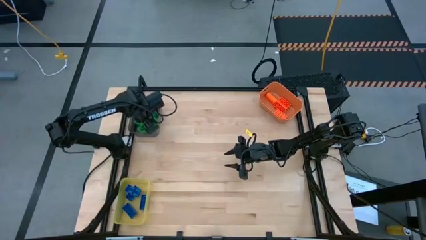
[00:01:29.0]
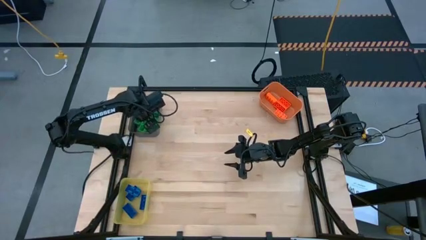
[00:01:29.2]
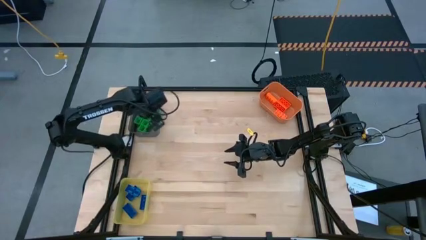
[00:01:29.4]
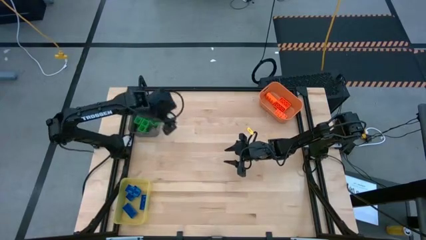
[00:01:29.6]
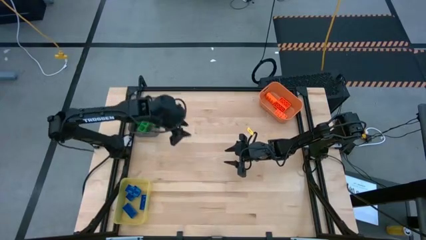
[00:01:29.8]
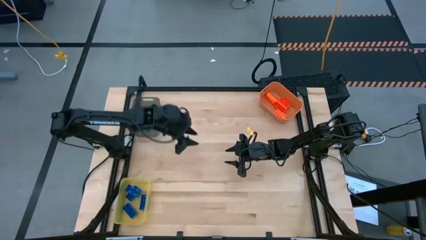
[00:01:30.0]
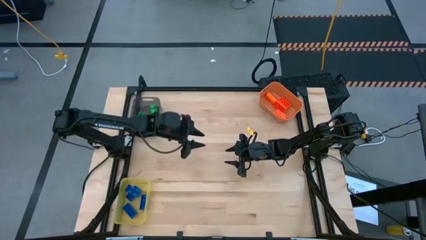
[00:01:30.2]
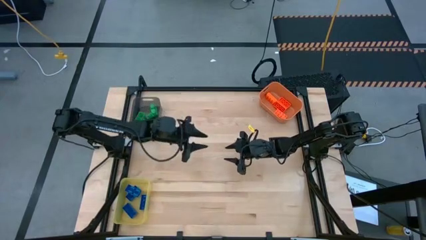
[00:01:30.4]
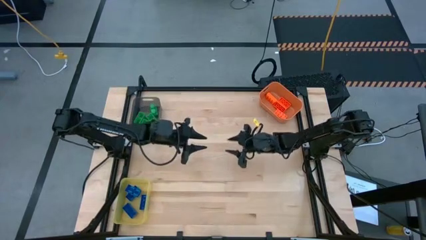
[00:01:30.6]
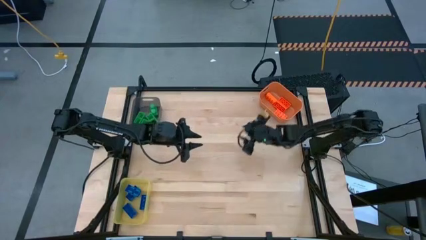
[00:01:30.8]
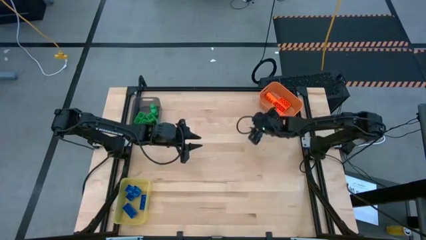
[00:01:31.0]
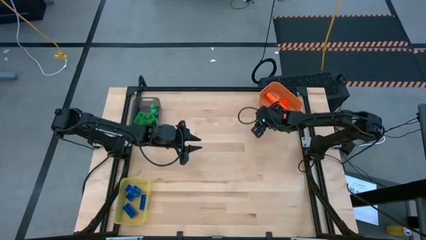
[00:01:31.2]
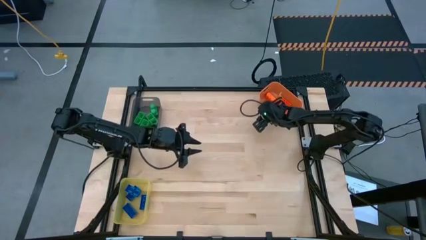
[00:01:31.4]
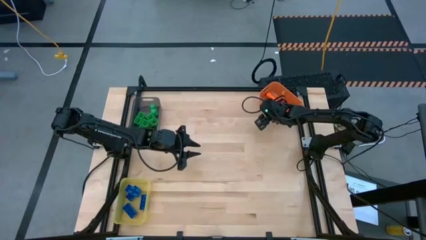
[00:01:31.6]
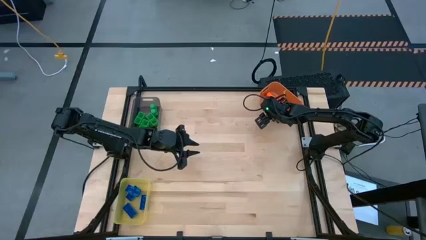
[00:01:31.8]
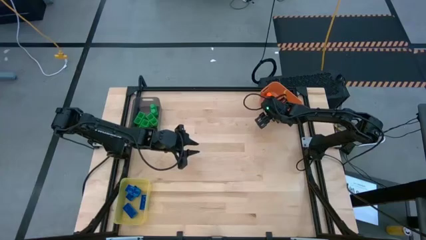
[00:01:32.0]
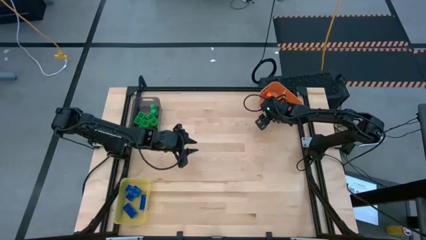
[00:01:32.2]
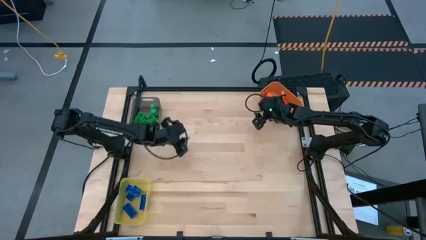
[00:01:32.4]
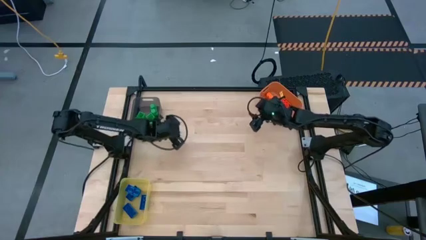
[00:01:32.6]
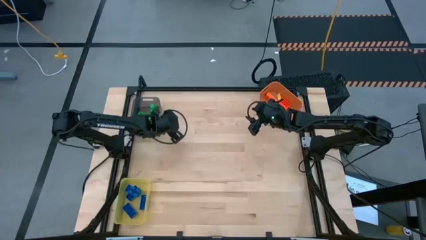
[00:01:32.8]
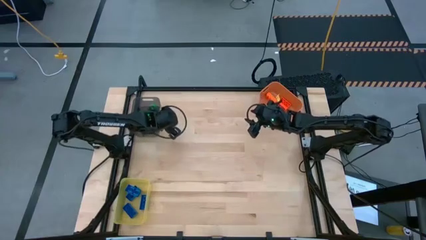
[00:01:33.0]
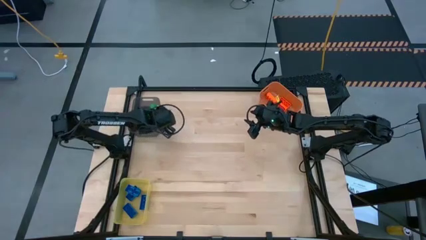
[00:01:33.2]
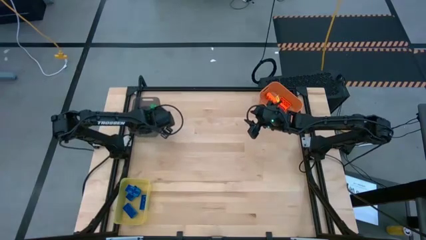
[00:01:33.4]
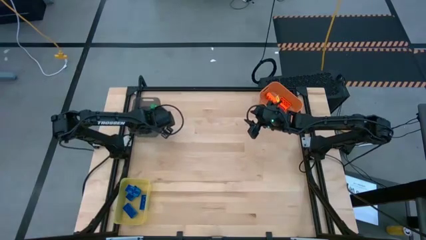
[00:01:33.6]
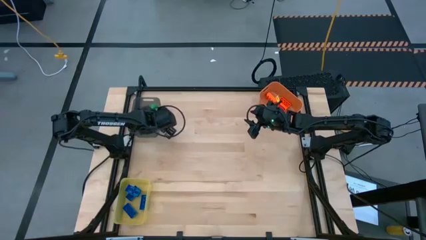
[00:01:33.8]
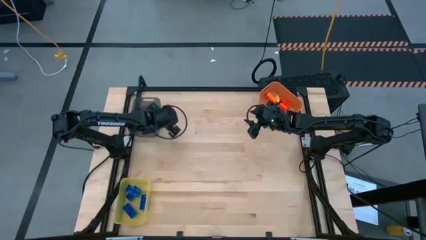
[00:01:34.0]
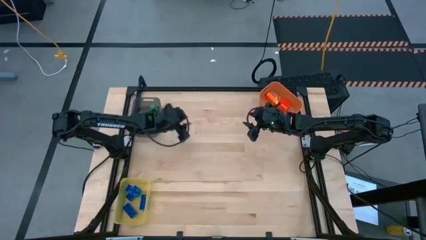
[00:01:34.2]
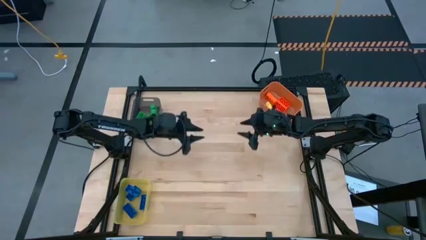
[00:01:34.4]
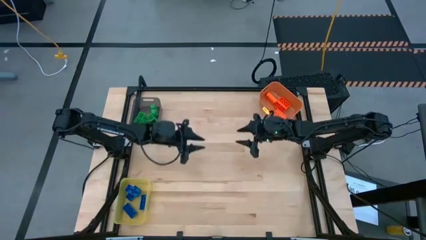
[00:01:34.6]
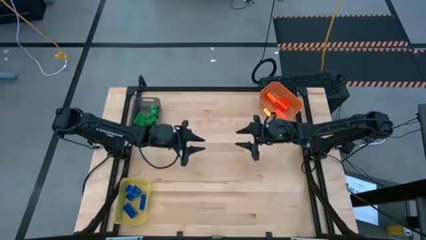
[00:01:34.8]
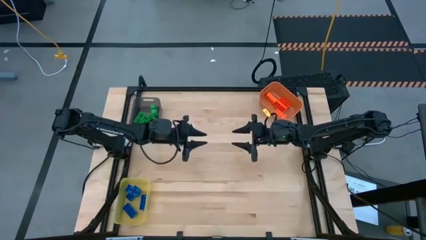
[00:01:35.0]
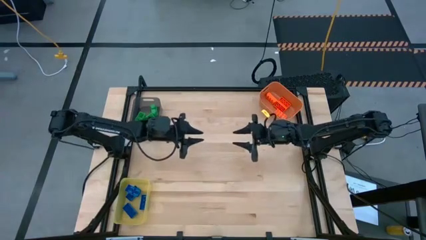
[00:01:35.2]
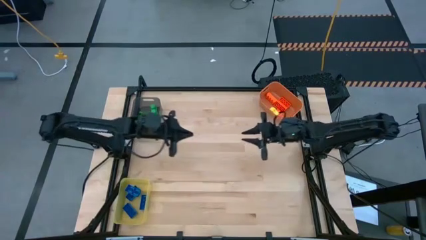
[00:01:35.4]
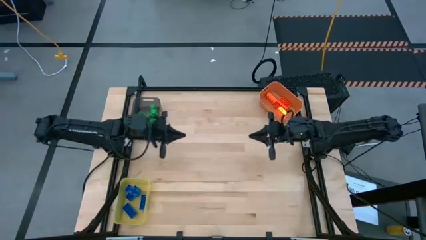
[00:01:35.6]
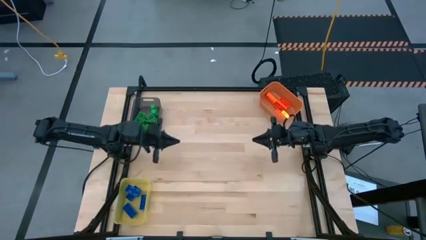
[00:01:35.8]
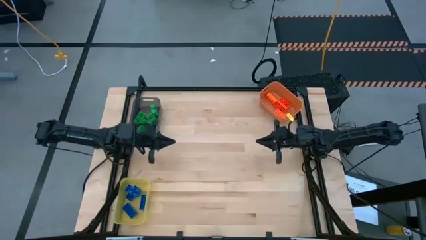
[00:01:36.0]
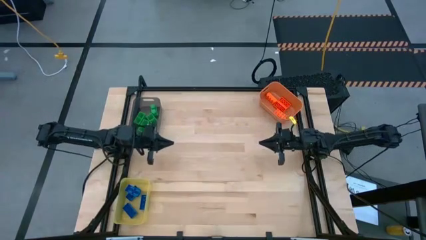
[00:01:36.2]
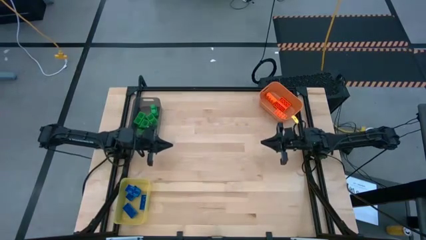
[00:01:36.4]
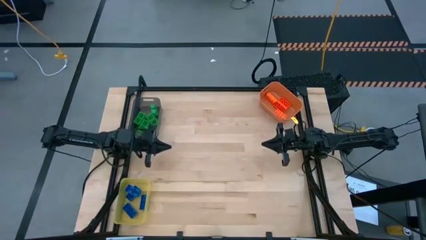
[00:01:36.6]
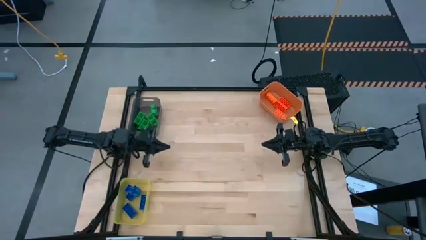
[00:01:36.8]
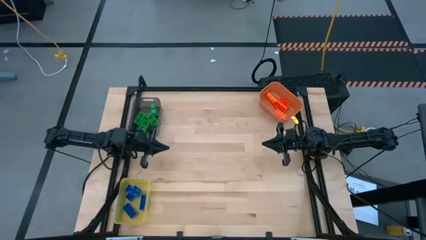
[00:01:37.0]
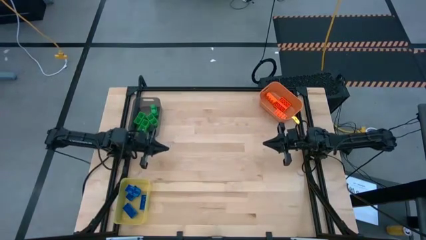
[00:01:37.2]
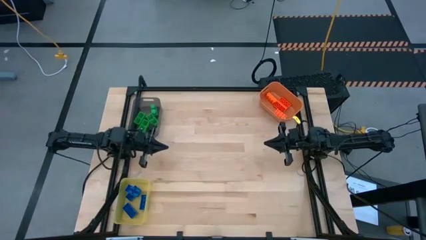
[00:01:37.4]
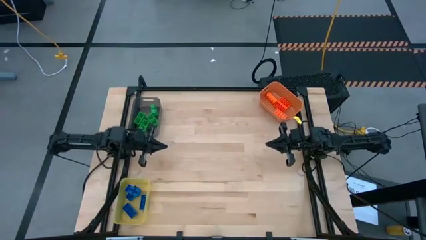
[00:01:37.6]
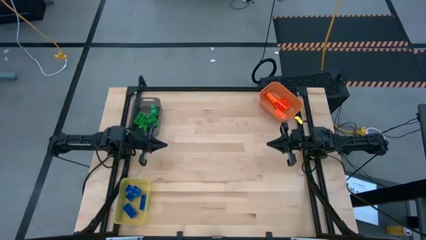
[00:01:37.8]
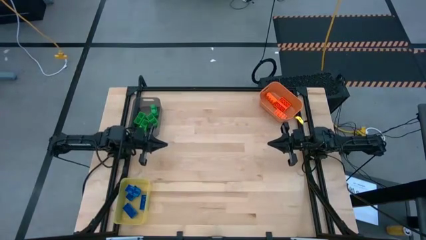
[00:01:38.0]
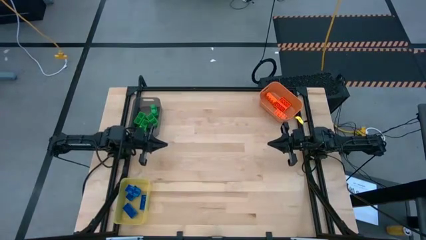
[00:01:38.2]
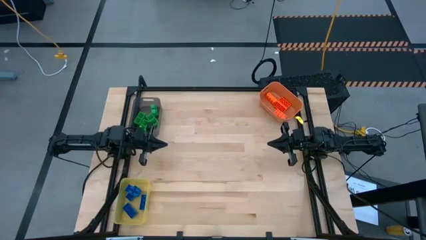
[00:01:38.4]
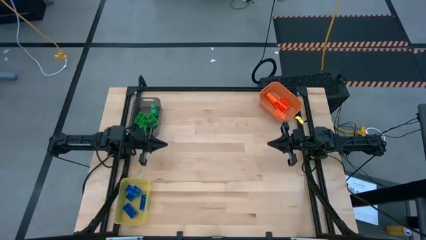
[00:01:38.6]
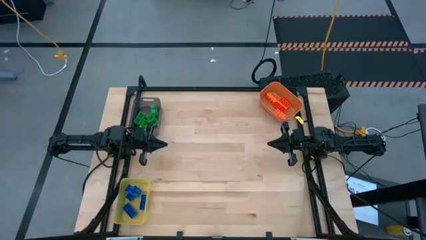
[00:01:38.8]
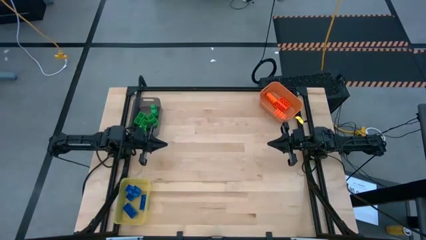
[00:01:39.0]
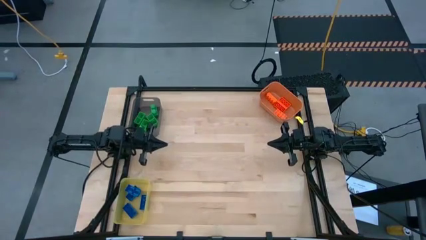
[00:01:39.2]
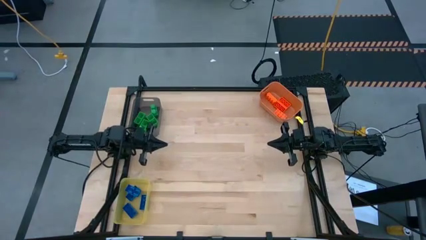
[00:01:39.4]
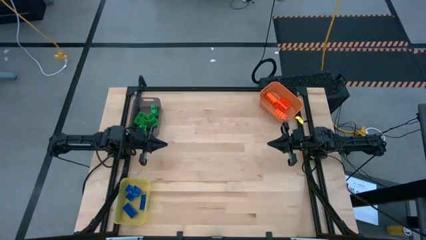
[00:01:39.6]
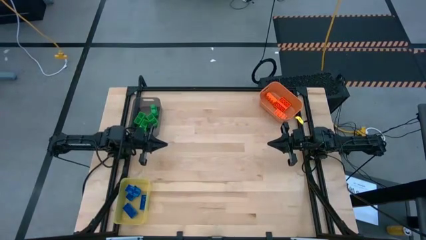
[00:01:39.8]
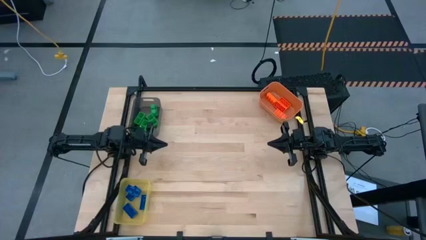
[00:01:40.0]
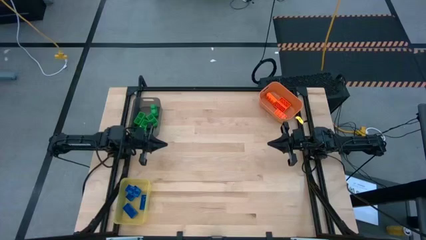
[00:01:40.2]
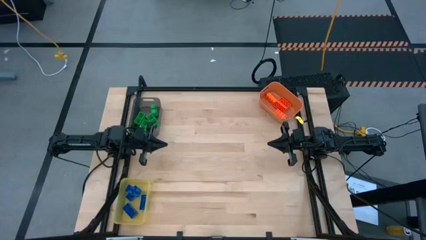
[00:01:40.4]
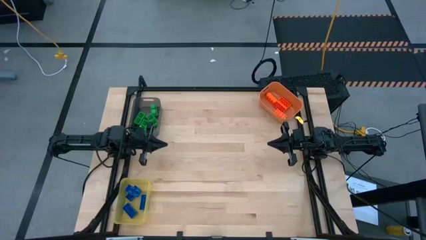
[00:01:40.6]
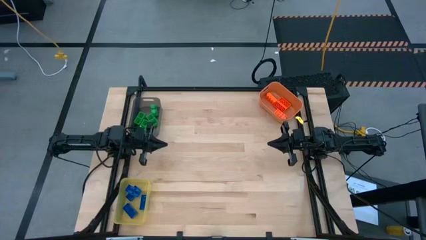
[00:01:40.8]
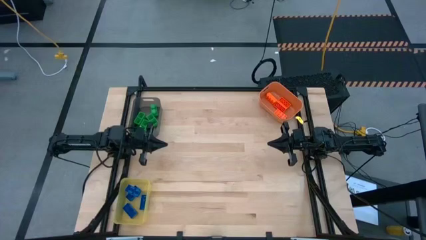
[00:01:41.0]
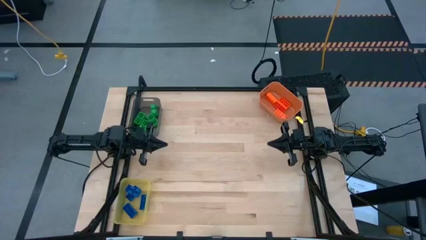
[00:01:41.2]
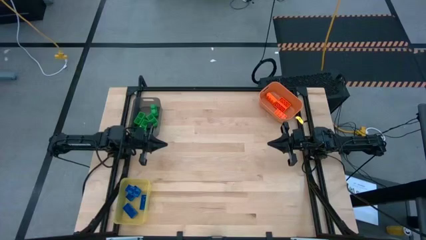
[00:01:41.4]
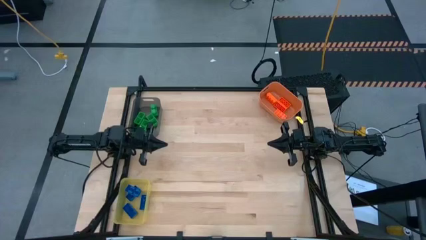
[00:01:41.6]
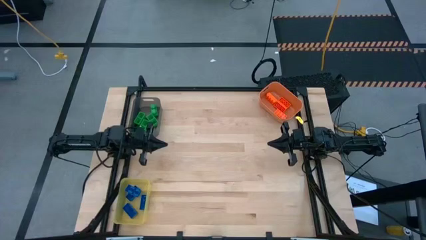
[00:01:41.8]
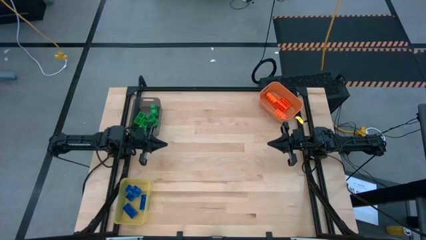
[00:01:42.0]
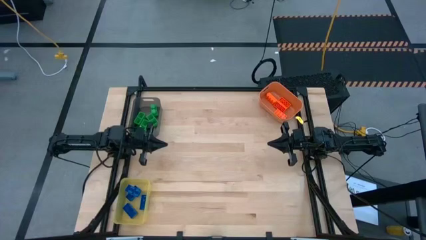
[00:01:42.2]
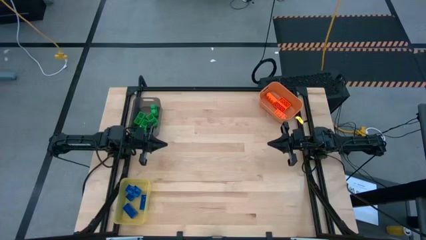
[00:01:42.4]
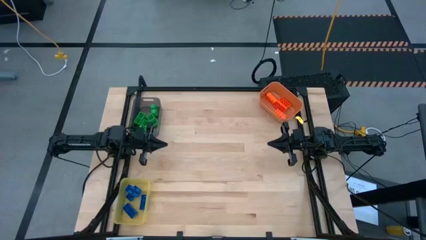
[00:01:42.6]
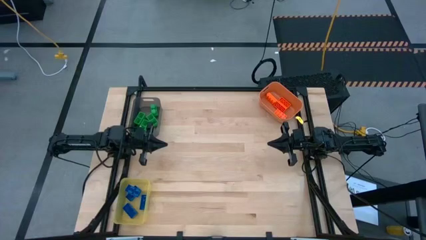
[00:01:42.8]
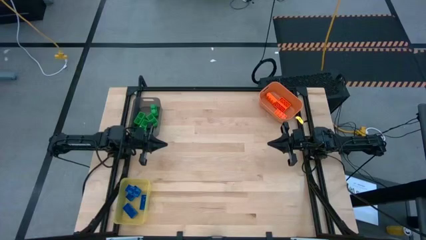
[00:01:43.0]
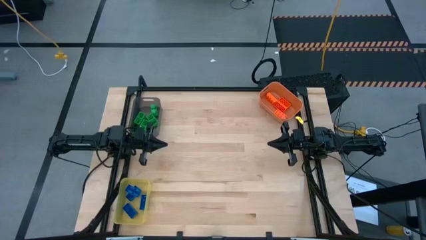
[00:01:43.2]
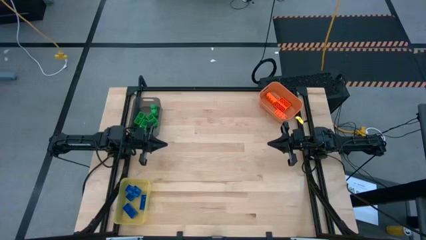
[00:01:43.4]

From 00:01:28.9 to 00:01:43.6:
Task: Sort & place blocks by color
Return to Home Position
